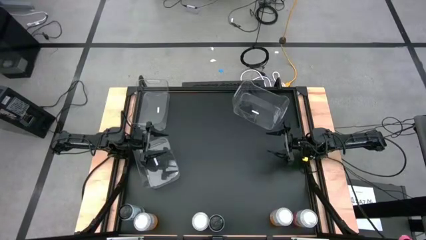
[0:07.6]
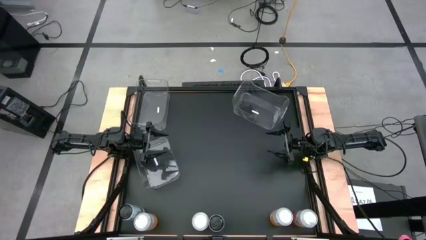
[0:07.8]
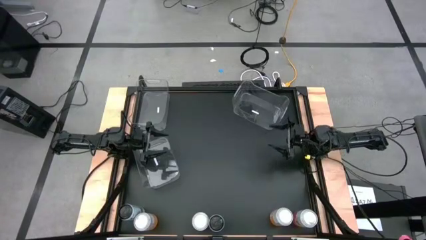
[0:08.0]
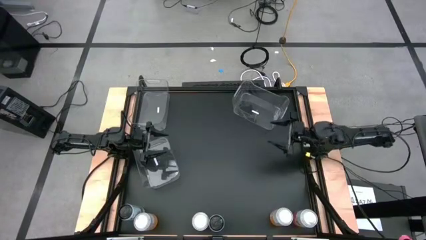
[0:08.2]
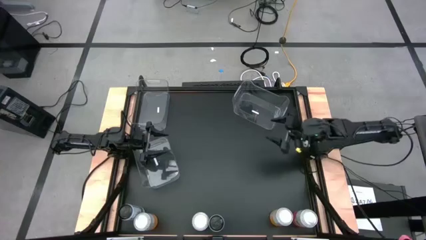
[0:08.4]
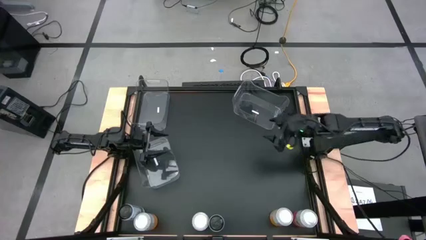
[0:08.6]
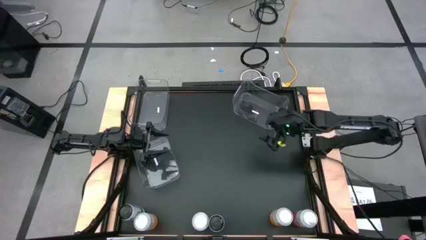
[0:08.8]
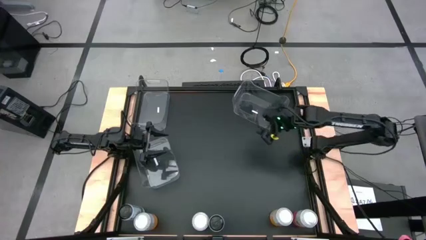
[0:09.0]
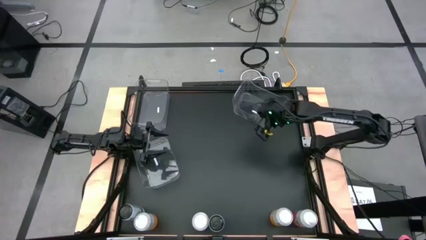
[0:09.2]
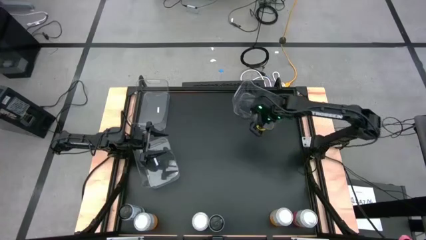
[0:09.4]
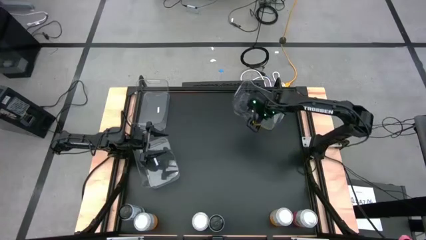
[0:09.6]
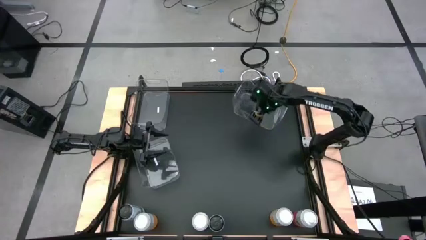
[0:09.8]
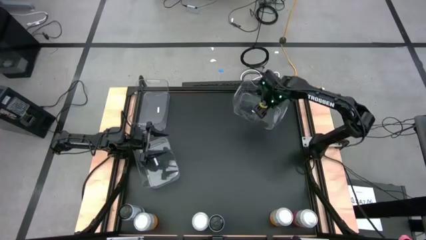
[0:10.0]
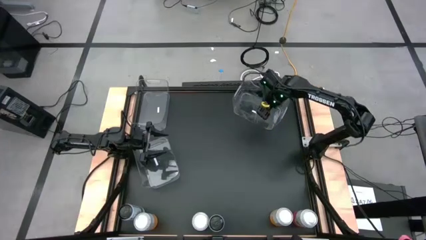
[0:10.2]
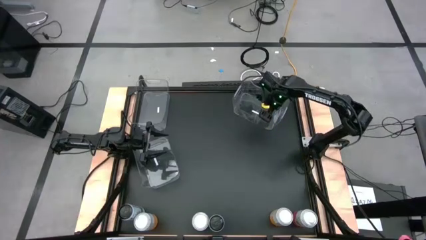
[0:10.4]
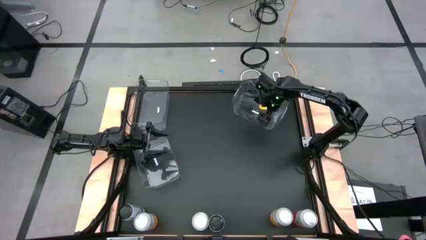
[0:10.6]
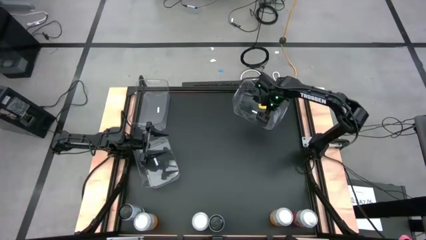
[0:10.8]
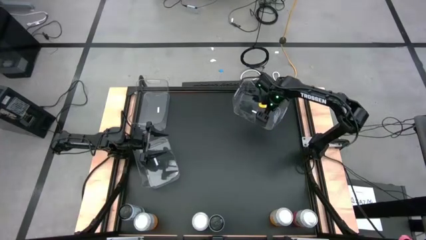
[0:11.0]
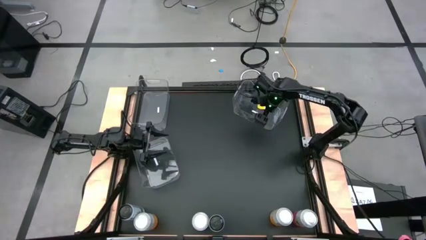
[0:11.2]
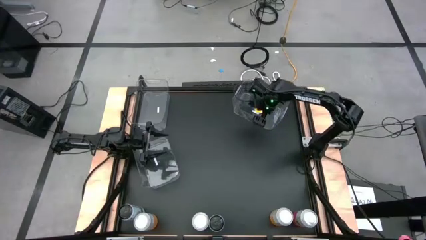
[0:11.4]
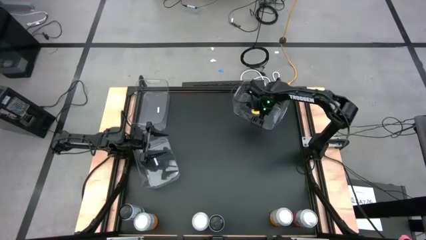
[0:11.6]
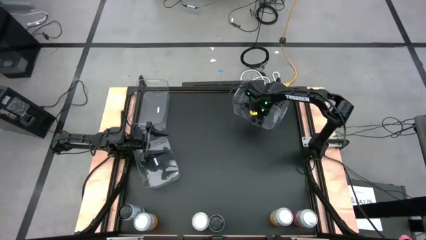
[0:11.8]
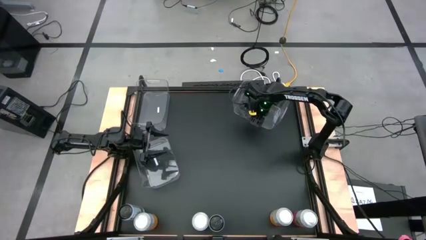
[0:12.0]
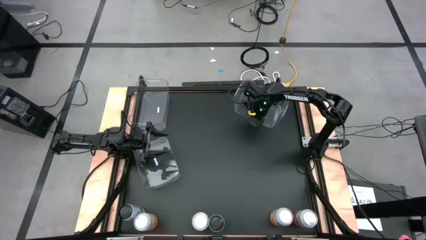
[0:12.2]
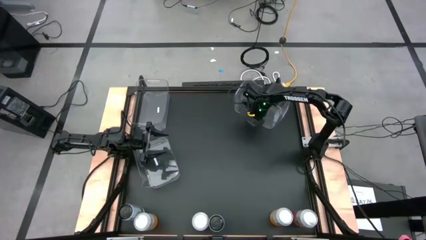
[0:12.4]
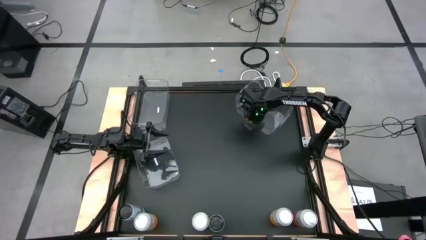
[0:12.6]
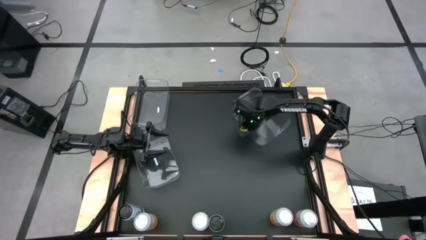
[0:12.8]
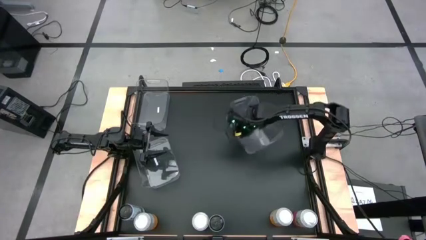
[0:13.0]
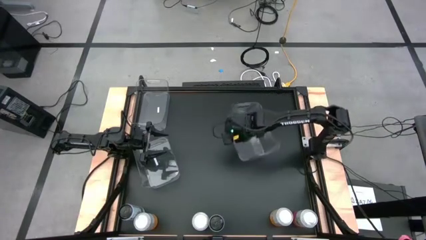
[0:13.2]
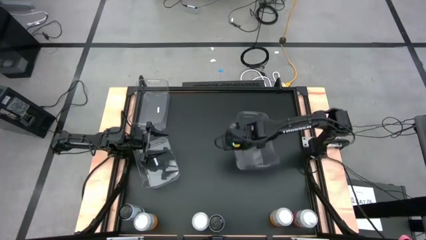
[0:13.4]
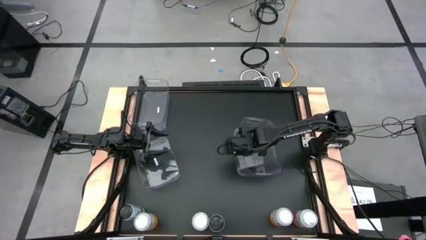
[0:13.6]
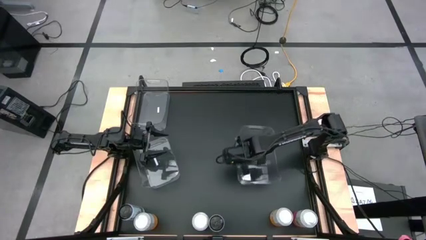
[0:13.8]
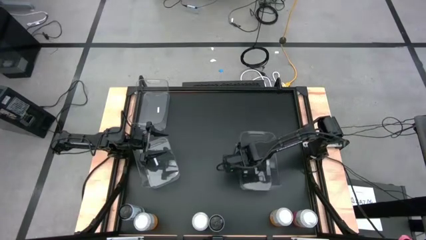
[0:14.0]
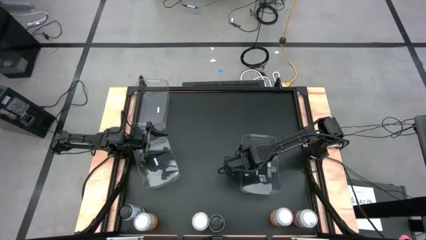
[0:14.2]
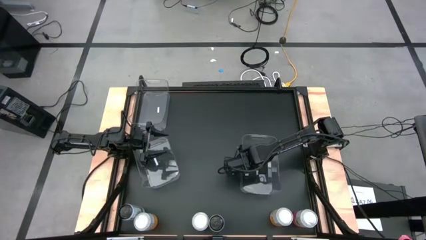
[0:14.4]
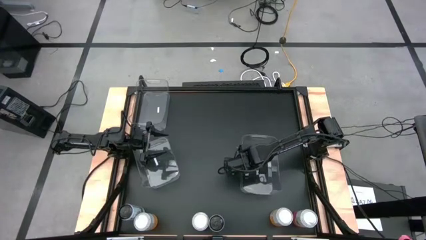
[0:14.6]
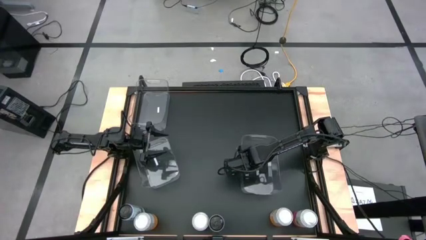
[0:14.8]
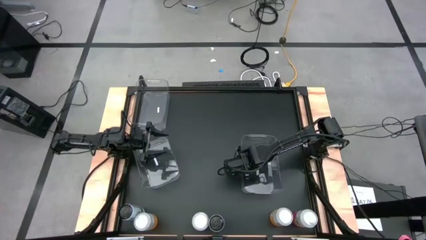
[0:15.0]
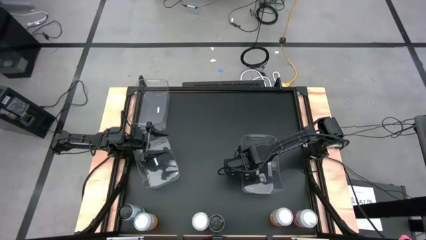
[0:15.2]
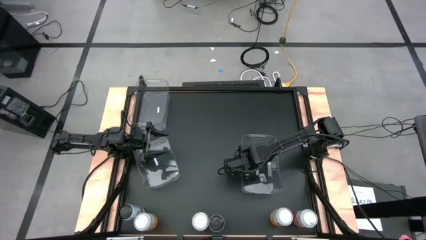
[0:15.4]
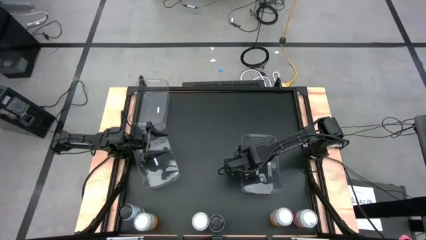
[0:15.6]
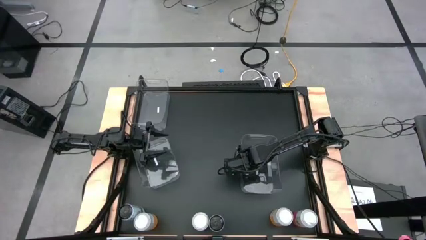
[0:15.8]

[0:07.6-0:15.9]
Task: Sort soda cans
Move the top right transparent bin to the middle right of the table

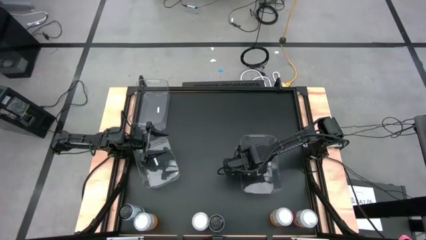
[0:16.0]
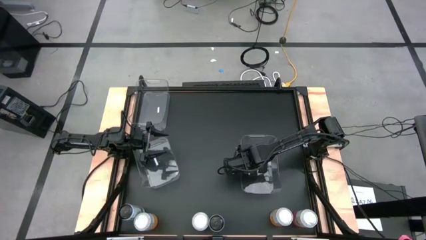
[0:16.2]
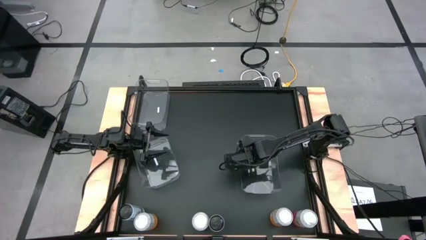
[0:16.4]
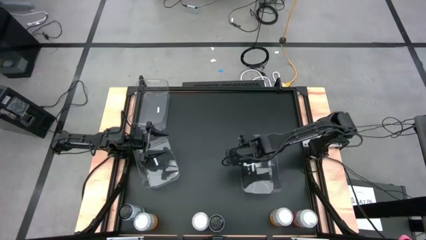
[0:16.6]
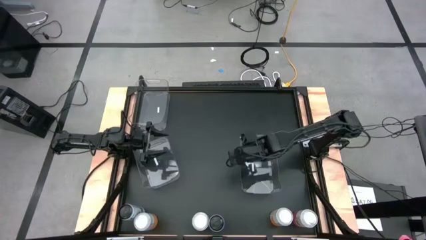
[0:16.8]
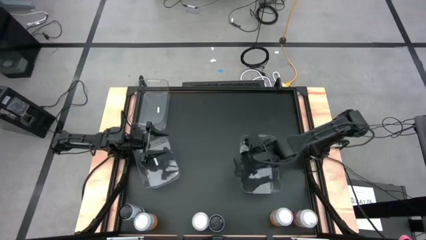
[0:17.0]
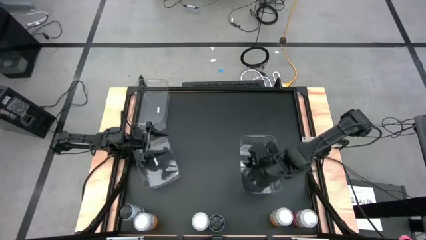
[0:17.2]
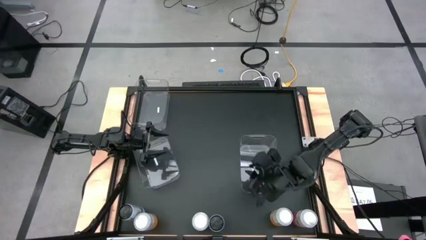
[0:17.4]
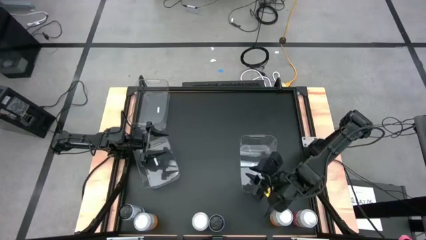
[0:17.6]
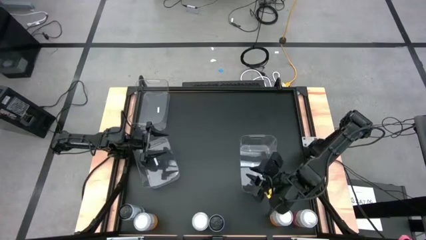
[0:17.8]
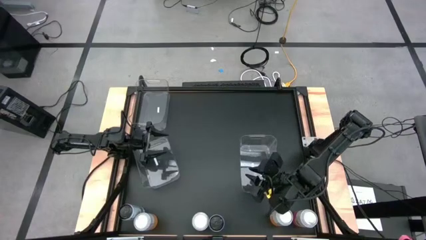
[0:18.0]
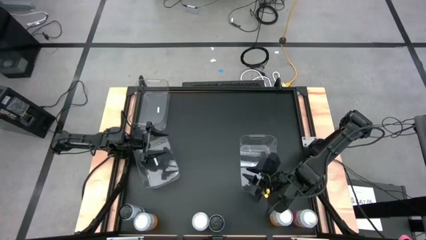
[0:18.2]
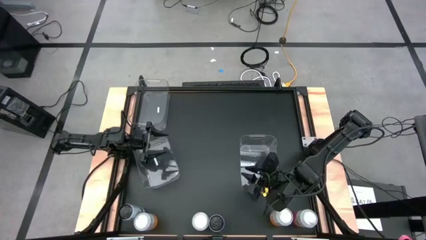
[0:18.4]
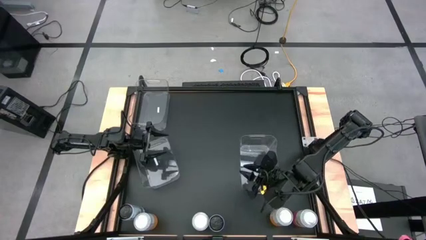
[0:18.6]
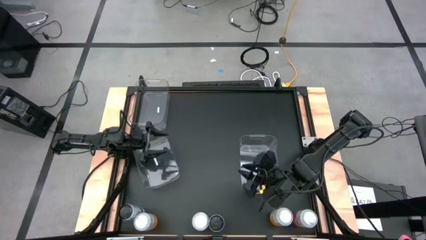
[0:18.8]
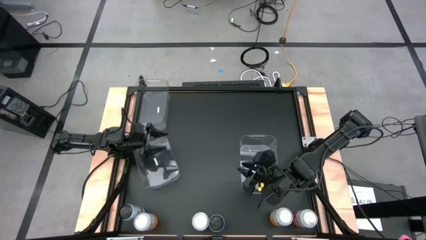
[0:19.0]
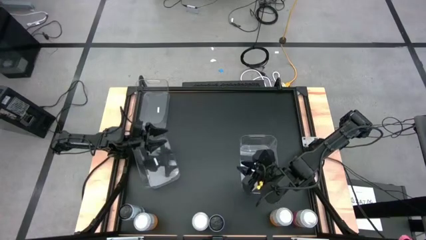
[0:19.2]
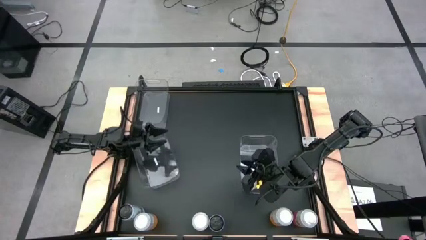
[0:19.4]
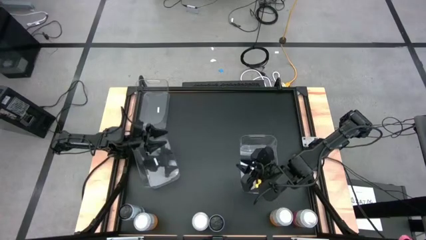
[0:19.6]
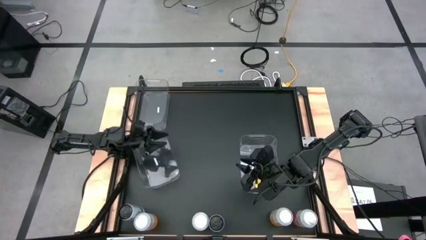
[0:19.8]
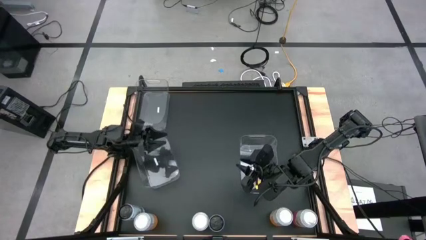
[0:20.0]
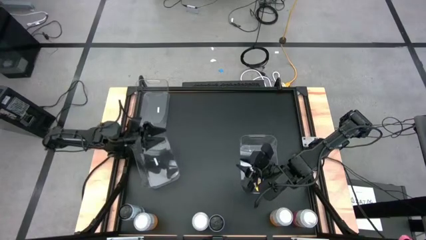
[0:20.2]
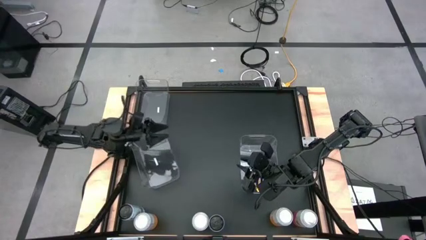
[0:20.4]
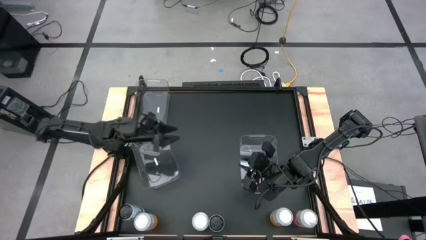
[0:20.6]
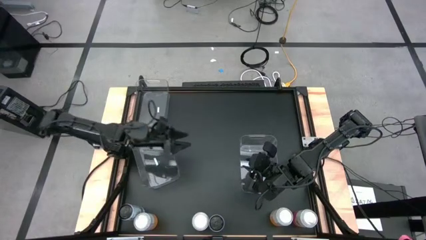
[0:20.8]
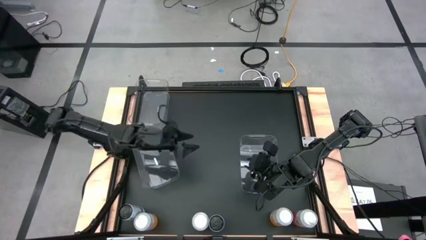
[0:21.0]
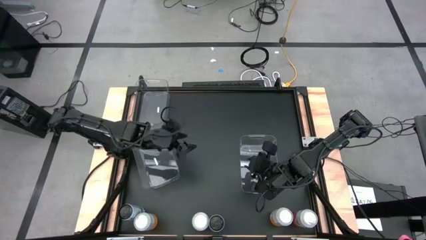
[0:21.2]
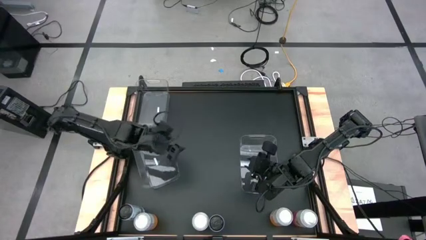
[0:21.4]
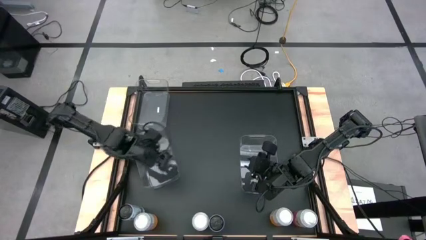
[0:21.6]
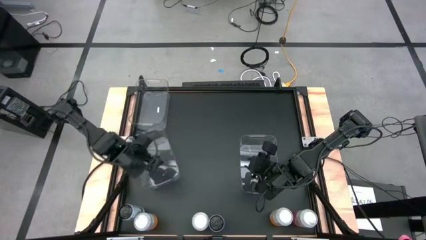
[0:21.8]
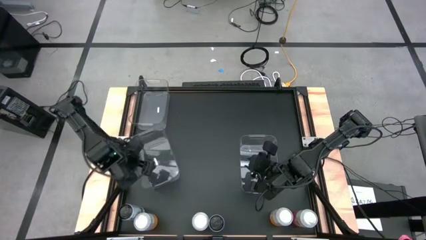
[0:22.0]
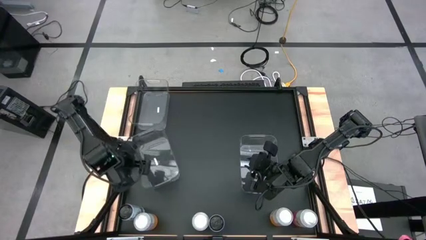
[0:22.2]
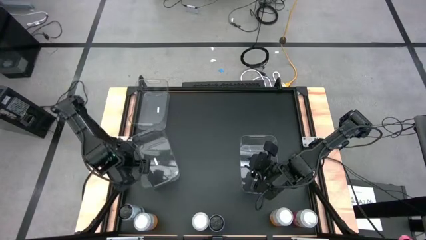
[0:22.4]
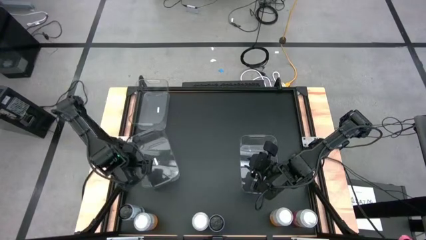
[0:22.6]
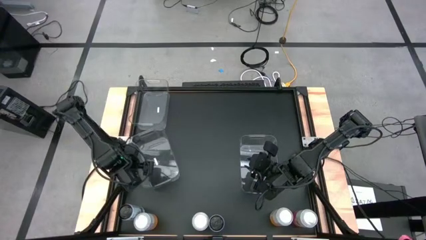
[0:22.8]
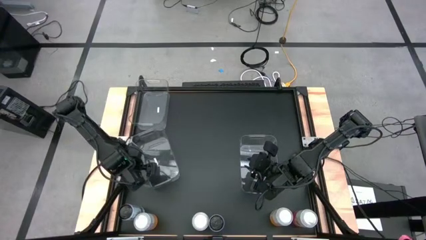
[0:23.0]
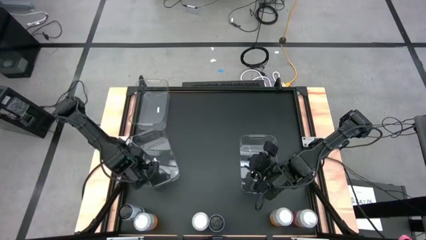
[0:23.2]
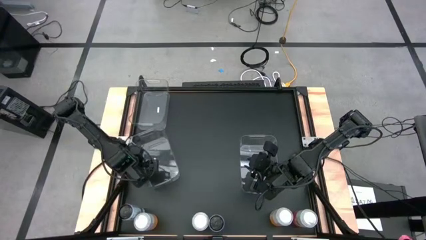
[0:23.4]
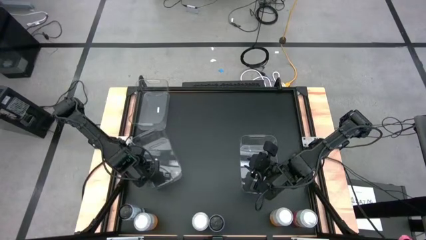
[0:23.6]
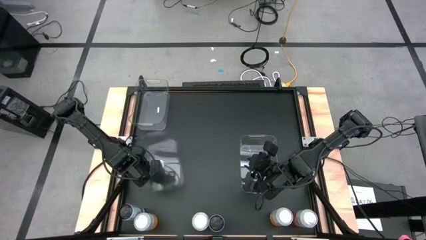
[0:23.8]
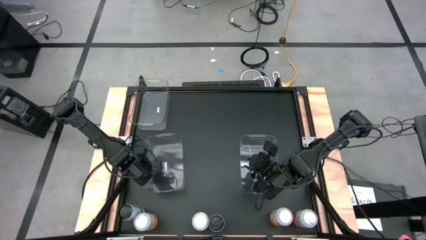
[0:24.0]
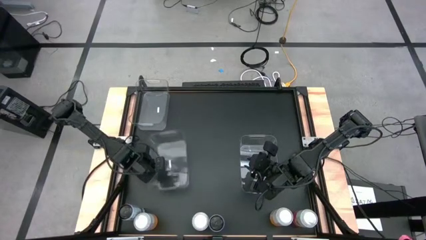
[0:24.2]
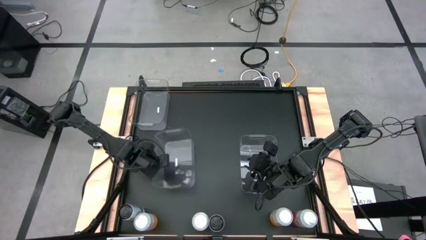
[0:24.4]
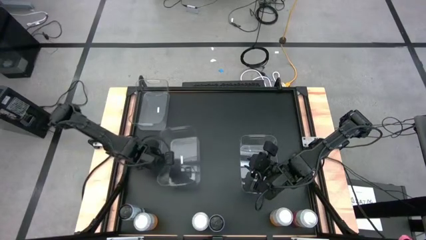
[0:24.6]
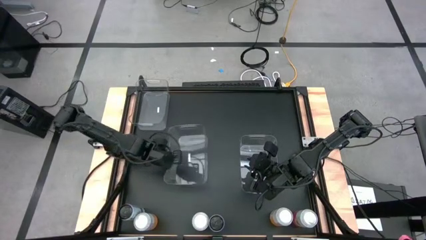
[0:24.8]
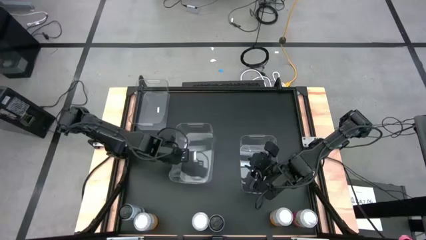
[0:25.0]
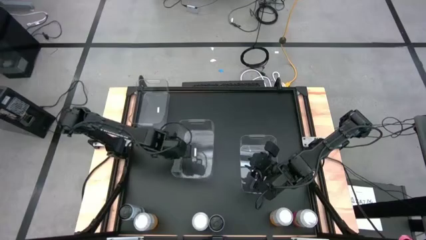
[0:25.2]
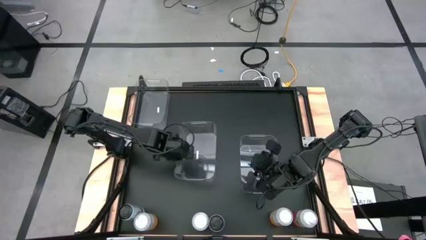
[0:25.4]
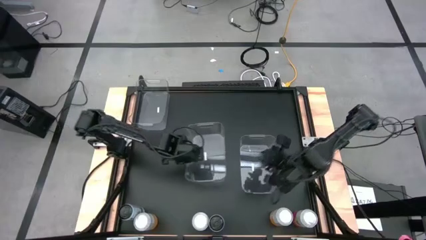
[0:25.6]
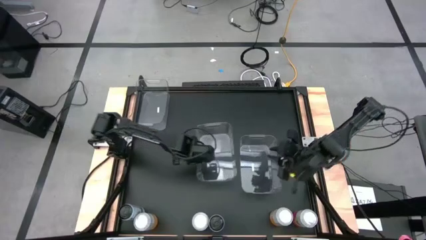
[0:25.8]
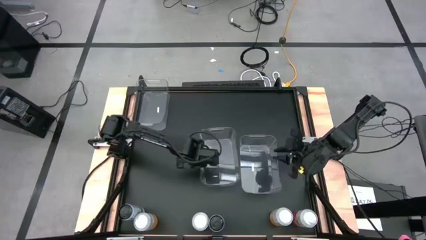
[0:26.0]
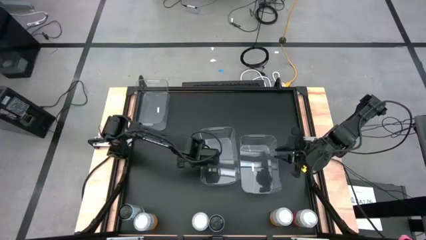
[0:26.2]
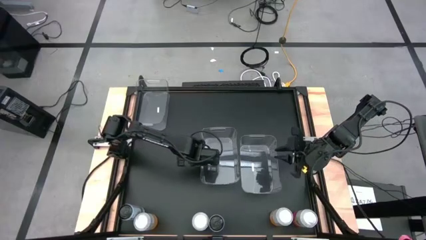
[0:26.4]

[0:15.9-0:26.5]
Move the middle left transparent bin to the center of the table
